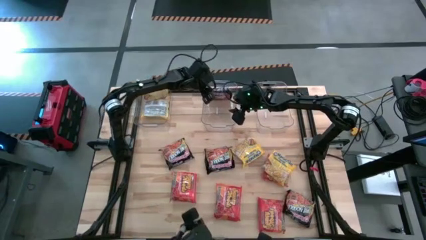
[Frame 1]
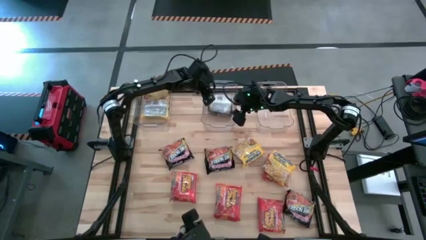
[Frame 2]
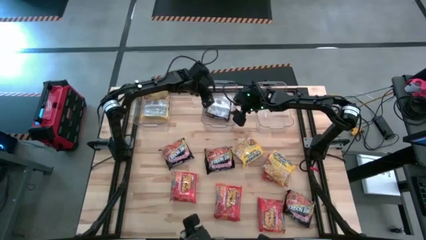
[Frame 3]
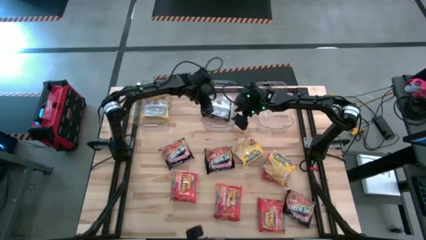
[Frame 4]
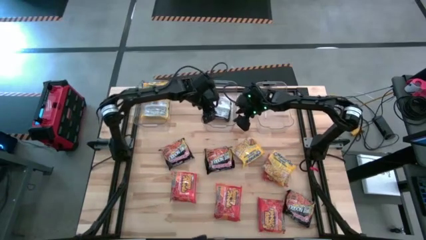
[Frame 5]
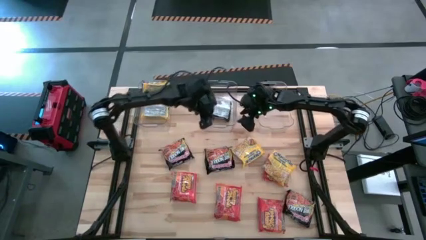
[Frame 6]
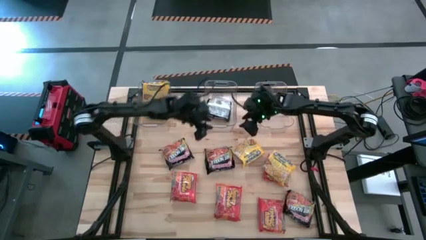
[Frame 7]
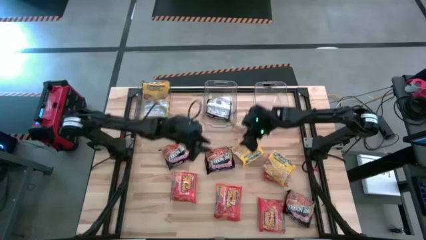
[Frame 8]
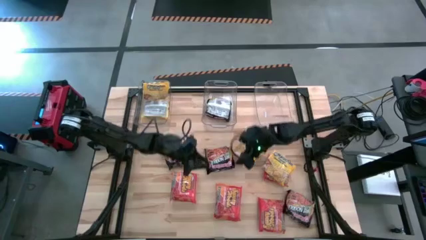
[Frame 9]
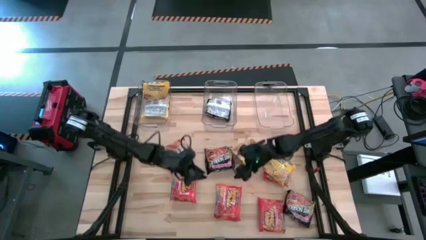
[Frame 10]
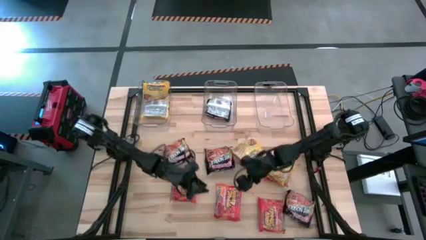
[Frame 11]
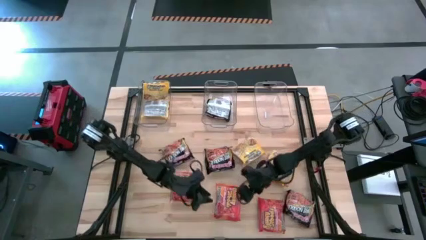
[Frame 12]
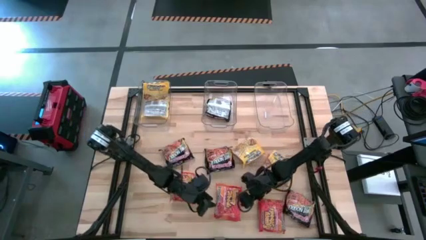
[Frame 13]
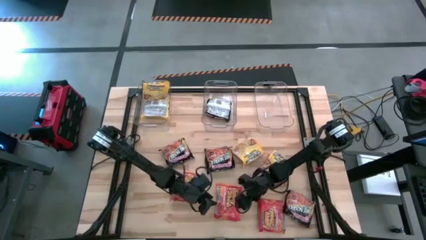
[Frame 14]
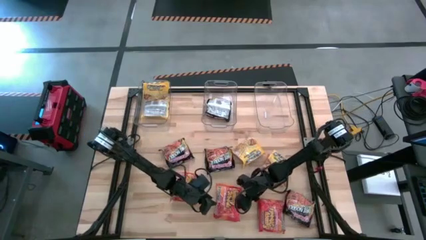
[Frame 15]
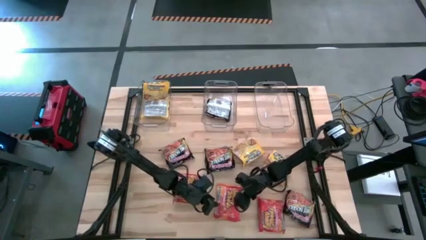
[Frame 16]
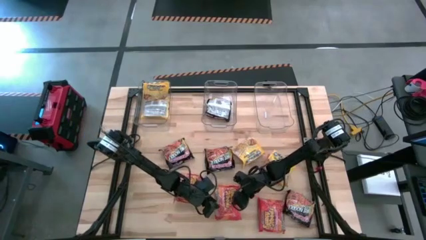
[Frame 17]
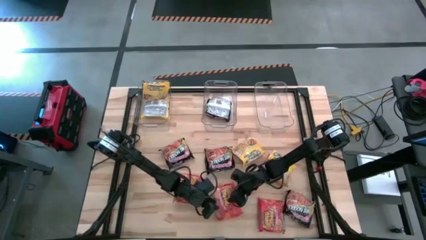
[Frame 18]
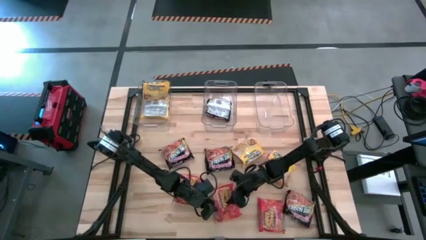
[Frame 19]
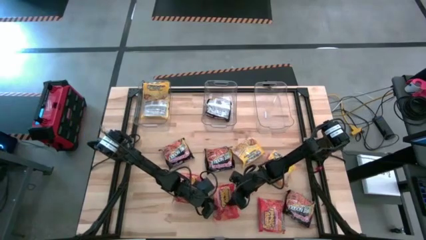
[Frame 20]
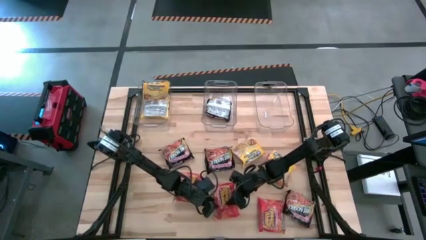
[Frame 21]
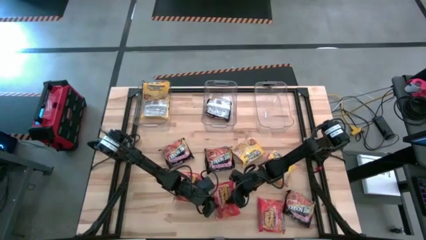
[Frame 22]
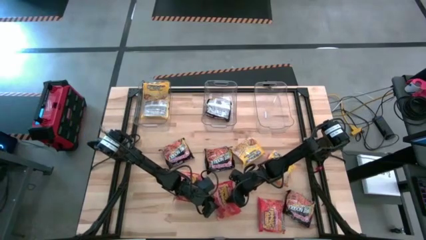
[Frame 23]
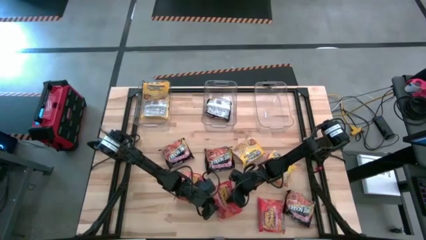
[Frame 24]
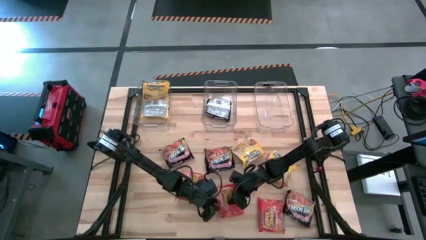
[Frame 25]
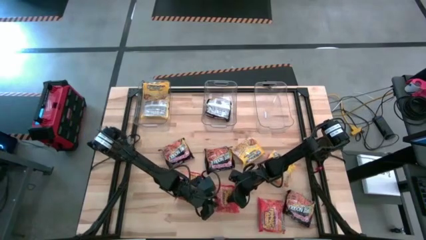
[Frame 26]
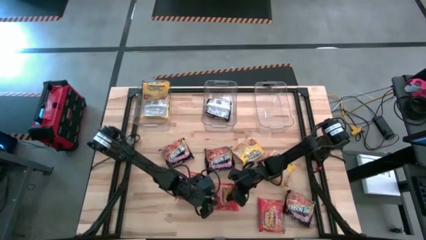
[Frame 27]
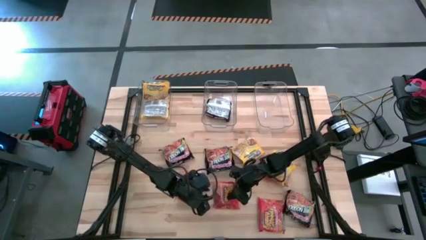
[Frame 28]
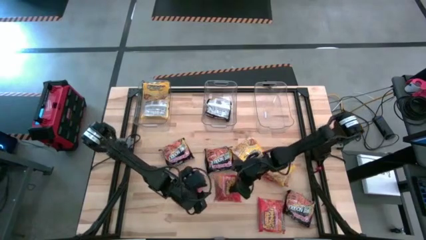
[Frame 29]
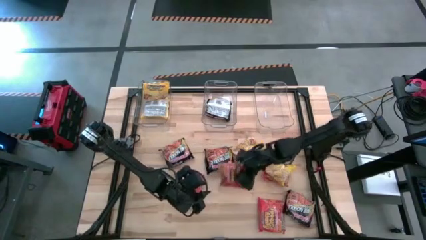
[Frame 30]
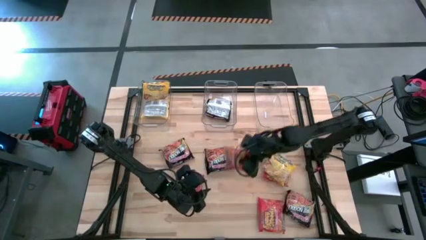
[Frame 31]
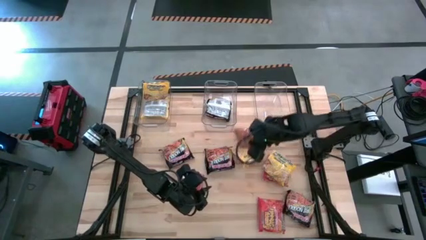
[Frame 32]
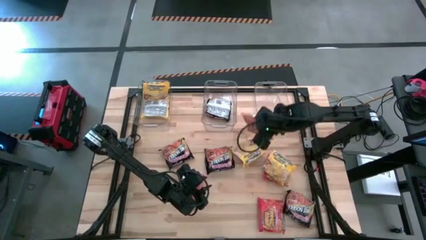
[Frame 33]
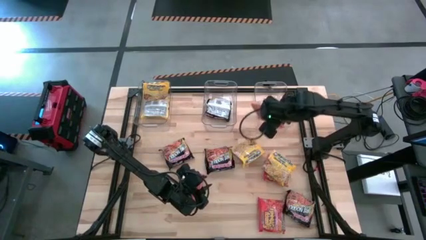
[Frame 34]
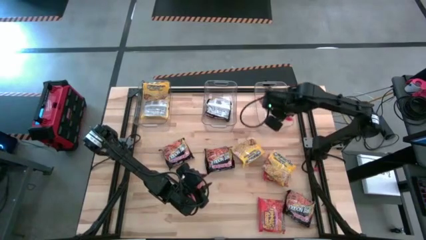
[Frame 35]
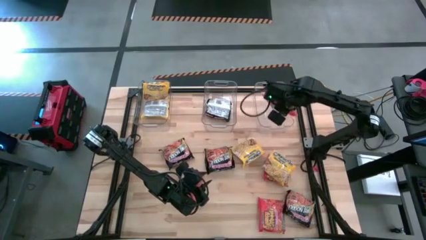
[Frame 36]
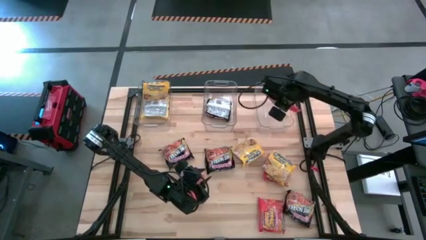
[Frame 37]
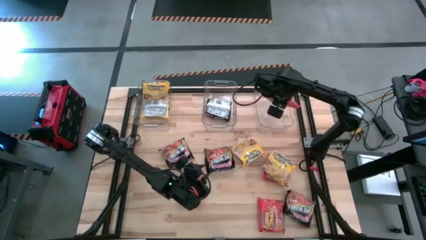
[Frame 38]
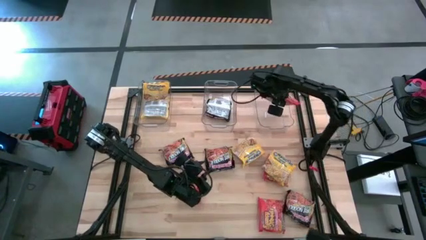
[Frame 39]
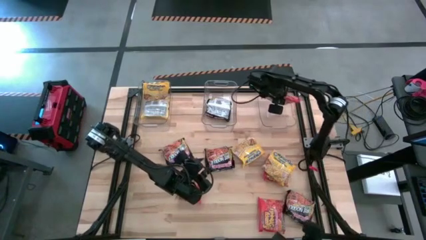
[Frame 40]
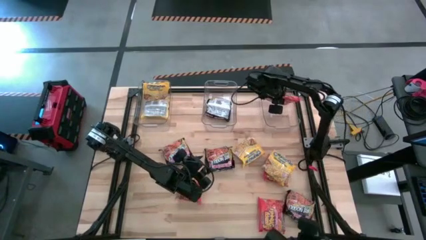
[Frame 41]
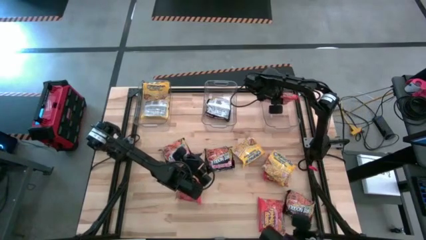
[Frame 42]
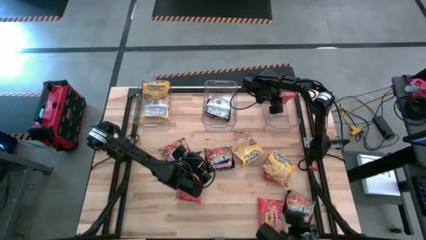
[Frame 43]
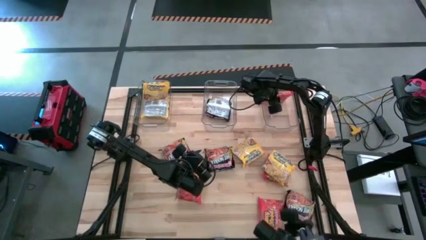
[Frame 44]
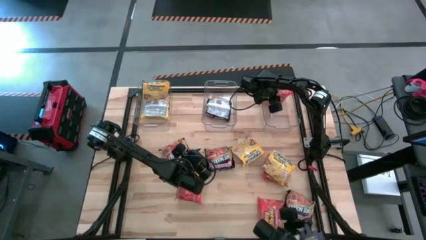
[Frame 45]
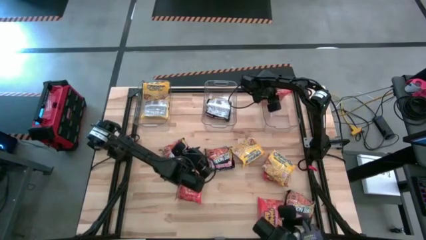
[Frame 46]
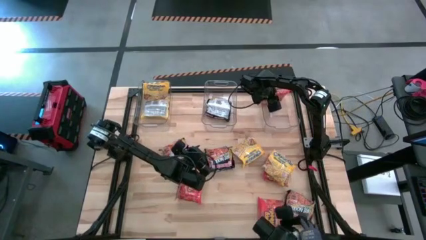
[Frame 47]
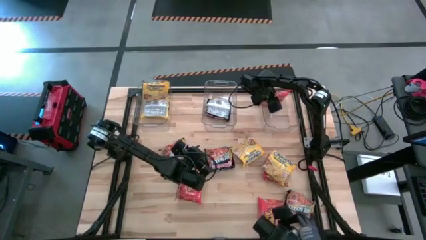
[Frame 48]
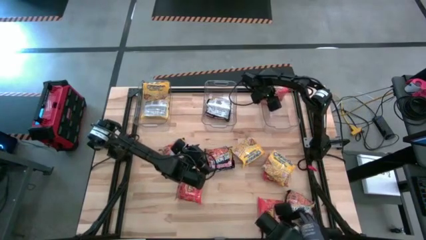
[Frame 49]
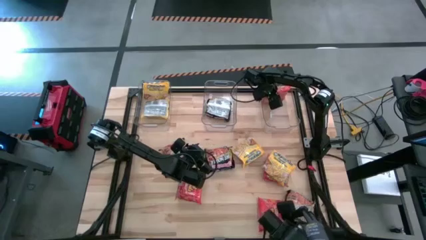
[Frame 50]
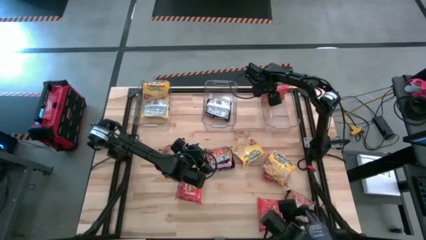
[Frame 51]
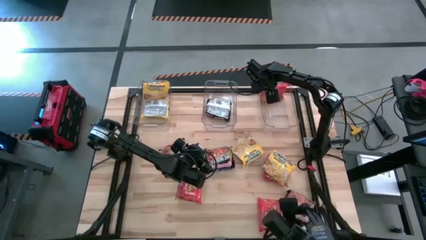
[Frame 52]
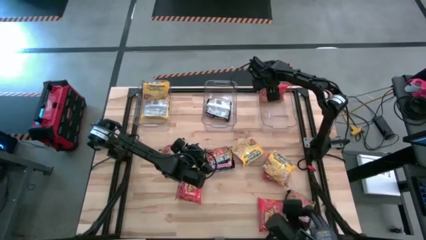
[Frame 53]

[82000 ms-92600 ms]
Task: Sort Maruchan noodles
Put the orange noodle pack into the right transparent bin

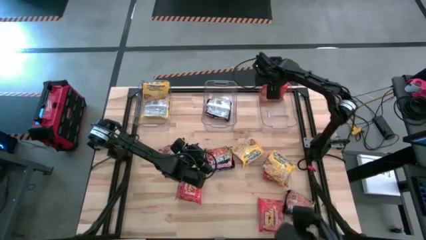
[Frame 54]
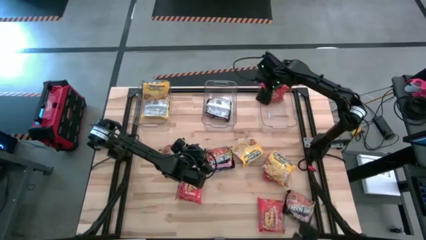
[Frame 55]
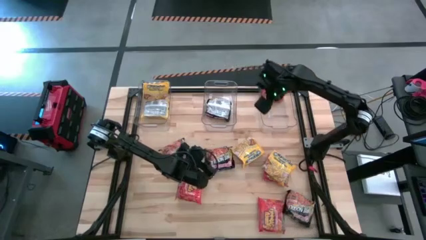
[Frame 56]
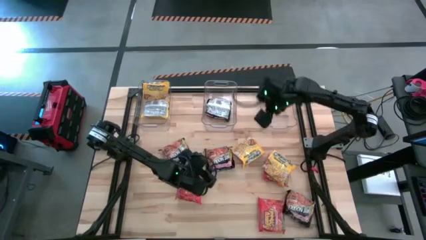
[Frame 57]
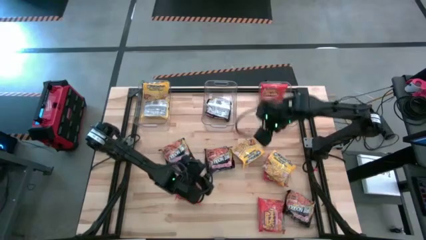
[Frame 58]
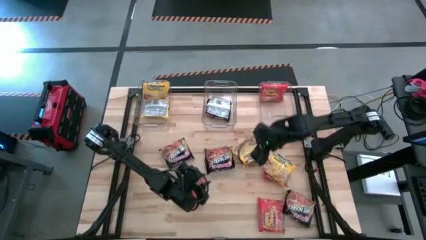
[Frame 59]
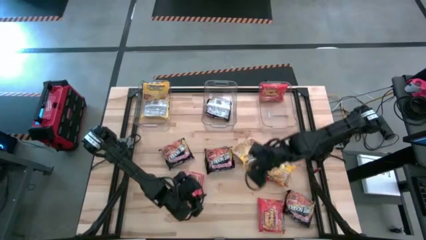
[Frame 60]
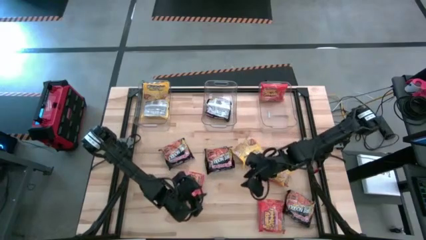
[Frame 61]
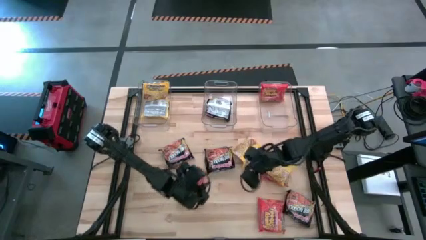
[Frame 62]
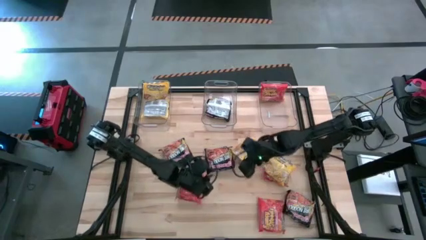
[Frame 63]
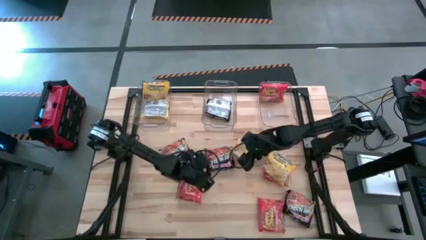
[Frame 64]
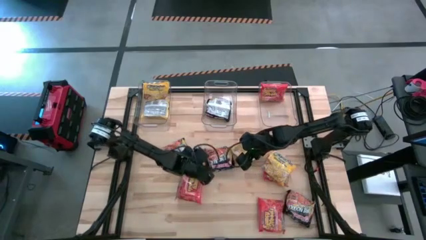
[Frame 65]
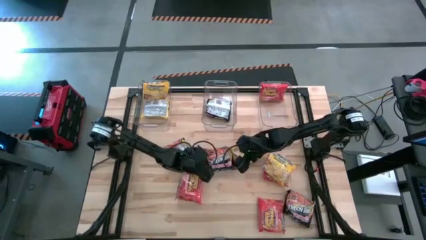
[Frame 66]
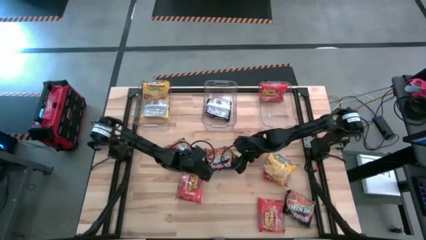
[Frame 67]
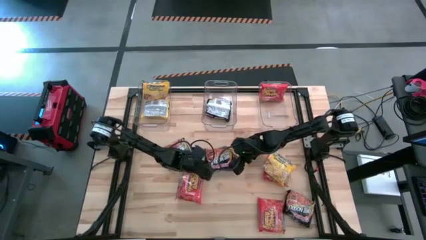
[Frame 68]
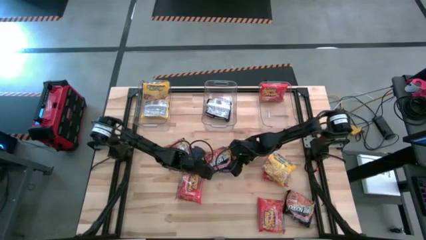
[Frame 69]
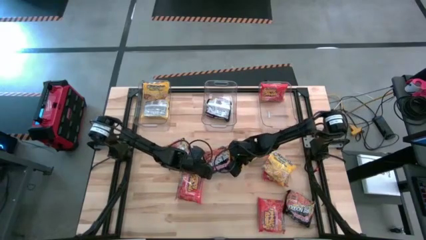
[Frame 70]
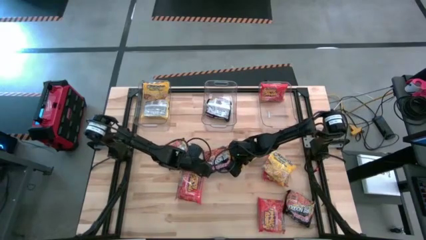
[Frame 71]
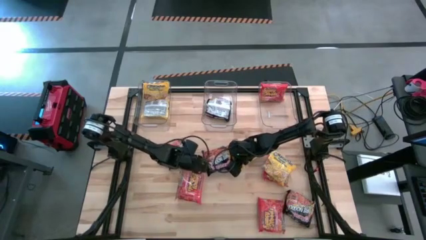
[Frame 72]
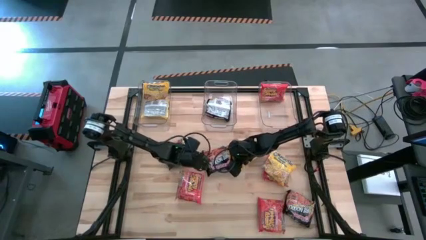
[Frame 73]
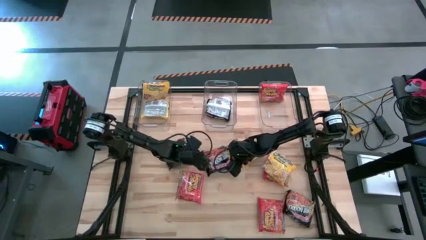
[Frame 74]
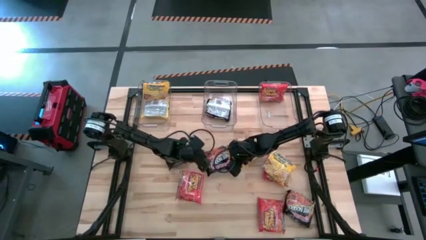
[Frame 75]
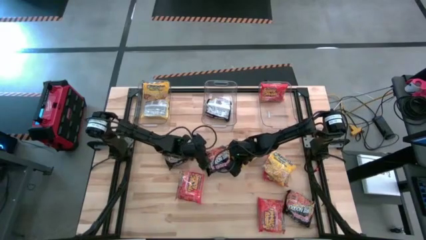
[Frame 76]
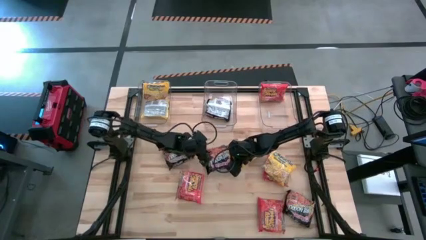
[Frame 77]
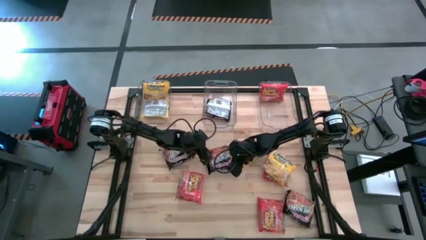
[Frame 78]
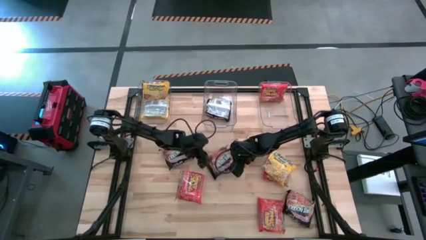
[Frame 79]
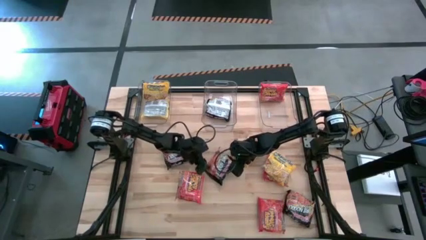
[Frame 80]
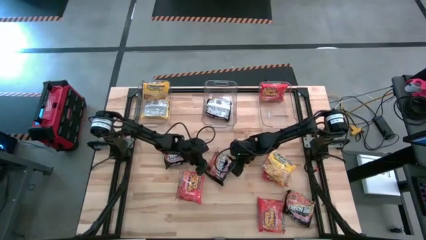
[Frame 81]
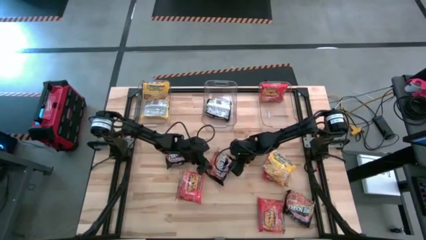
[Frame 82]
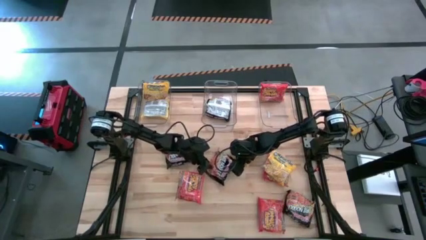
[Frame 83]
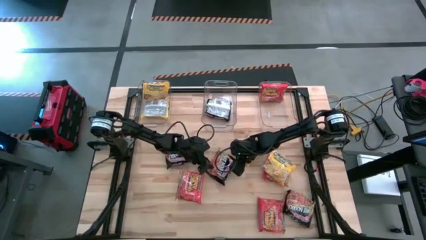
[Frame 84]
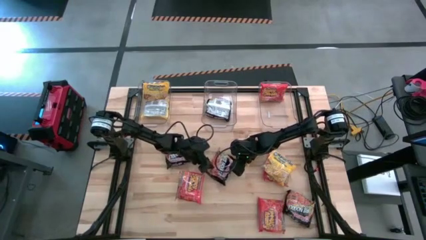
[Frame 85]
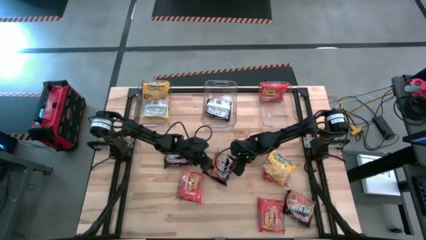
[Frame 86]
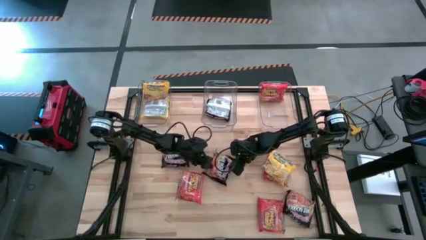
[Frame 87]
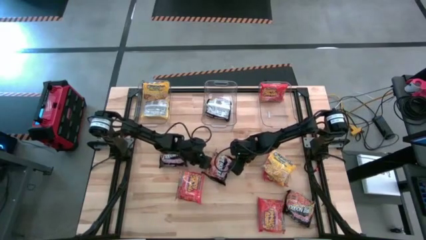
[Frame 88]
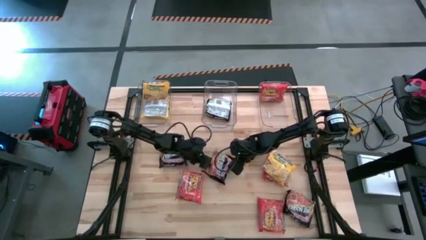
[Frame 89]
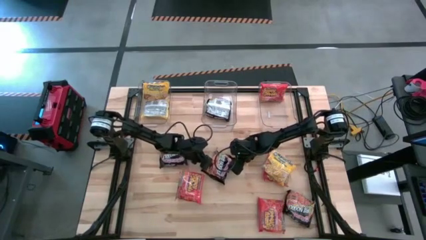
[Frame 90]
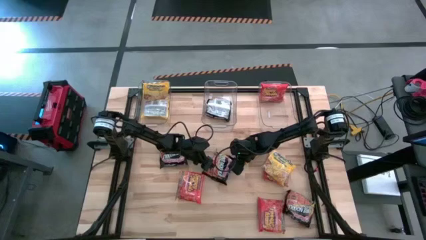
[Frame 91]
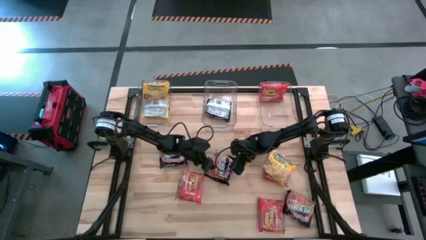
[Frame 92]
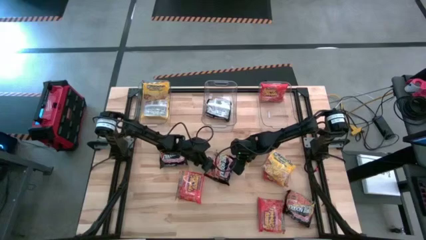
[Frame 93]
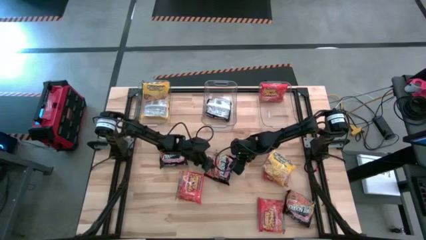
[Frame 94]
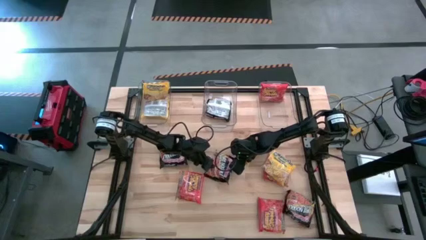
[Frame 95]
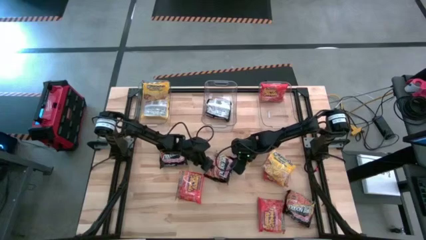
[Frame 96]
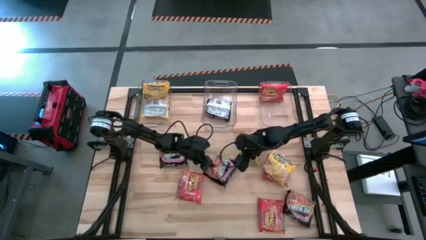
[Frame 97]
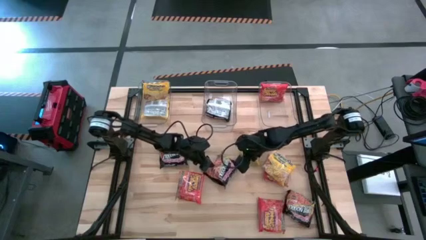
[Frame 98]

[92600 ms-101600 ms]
Put the black noodle pack into the middle transparent bin
